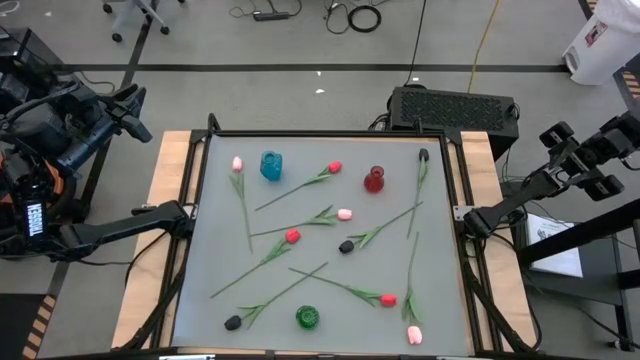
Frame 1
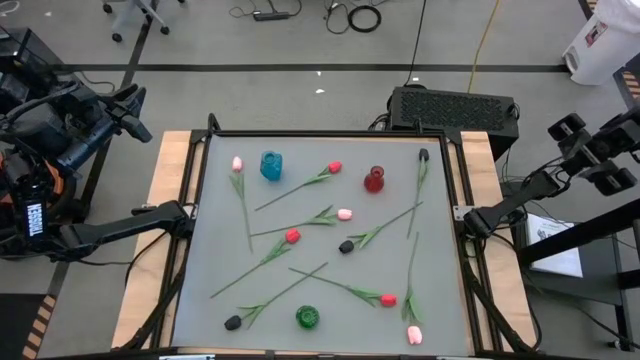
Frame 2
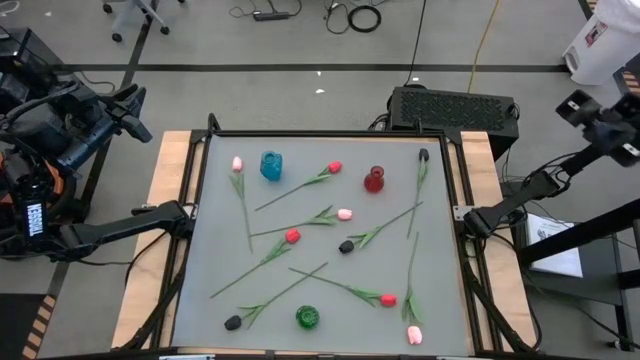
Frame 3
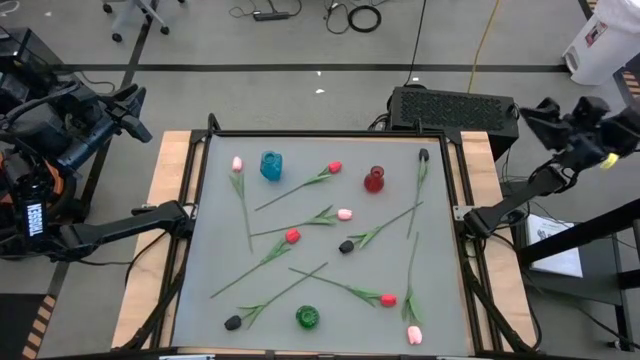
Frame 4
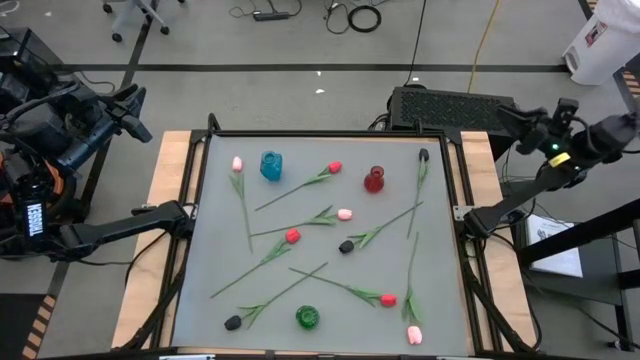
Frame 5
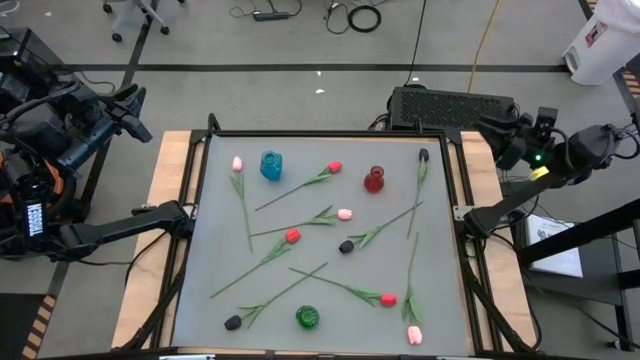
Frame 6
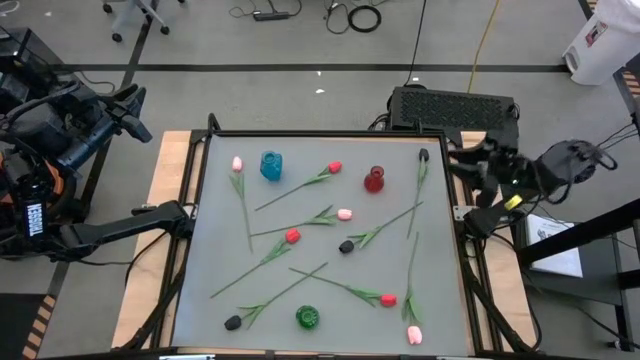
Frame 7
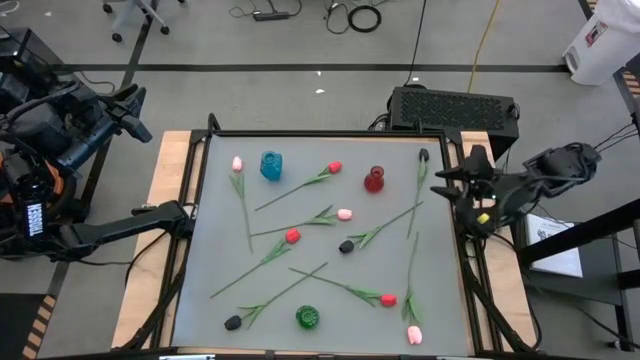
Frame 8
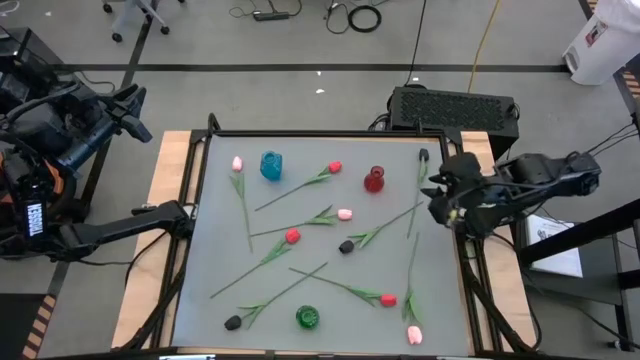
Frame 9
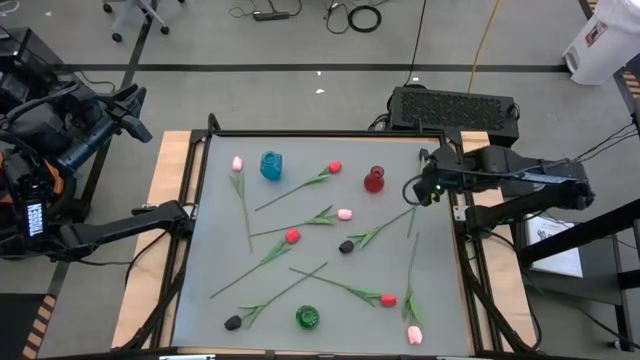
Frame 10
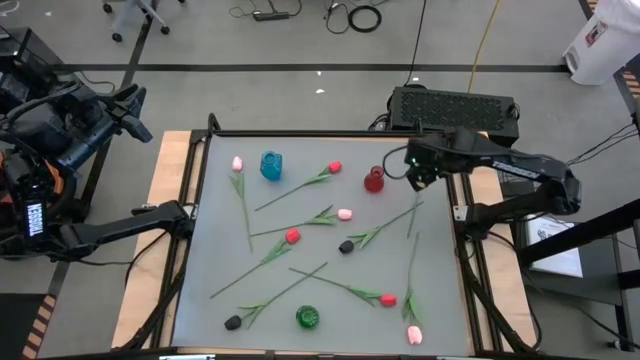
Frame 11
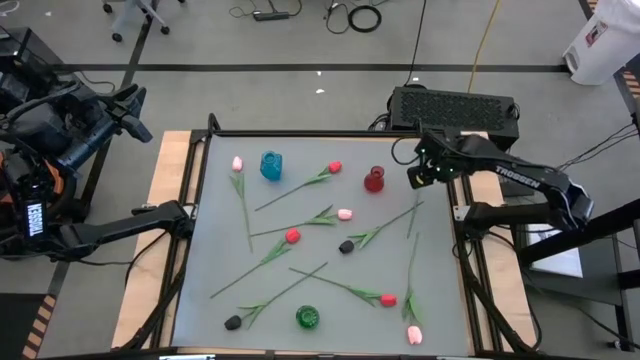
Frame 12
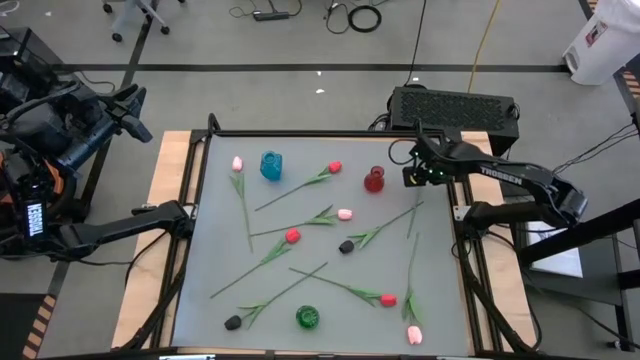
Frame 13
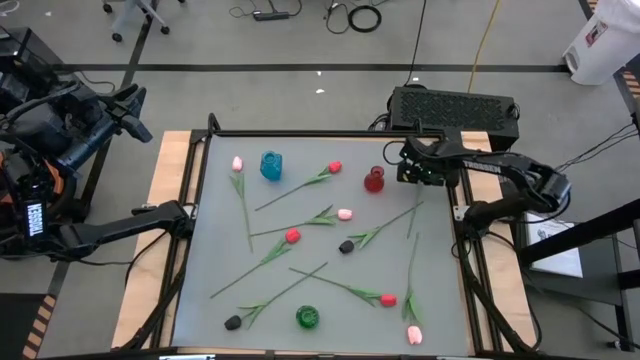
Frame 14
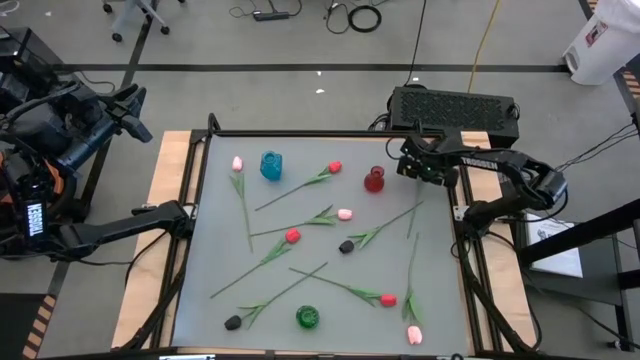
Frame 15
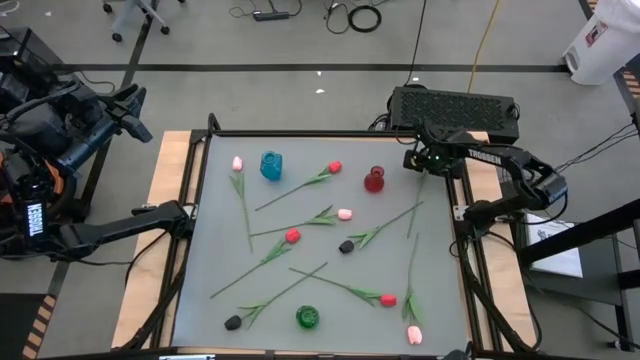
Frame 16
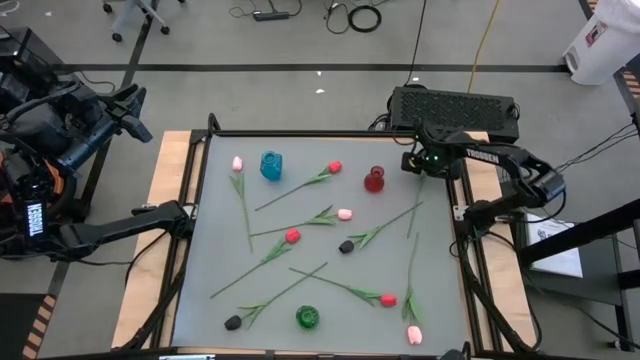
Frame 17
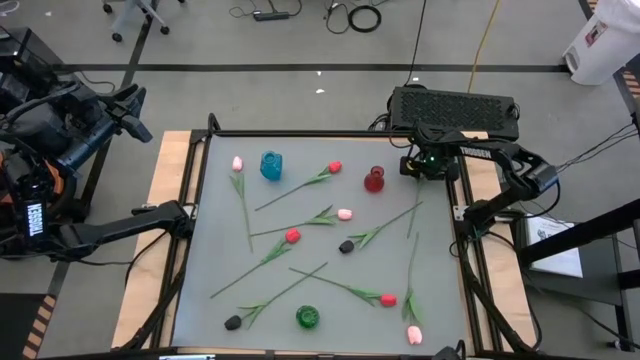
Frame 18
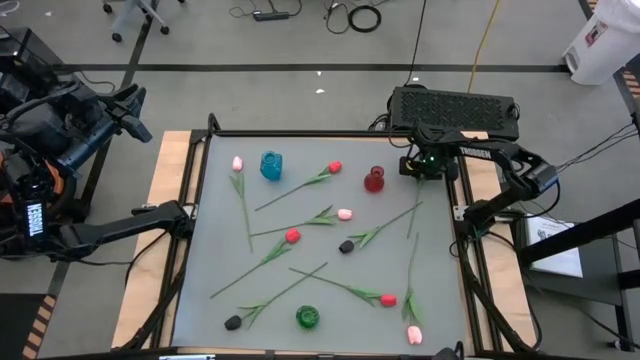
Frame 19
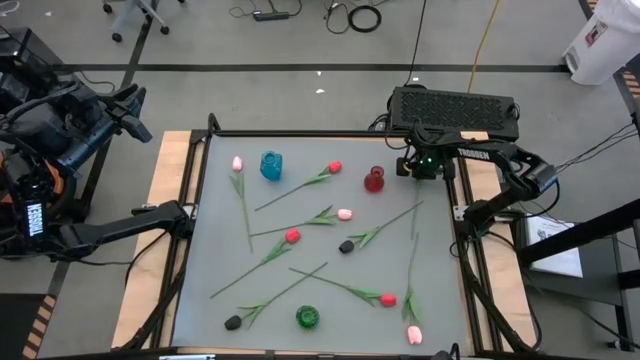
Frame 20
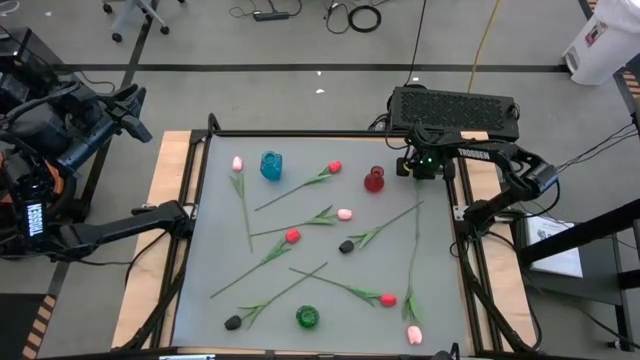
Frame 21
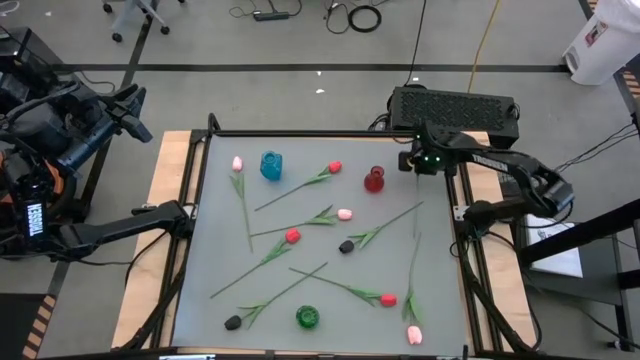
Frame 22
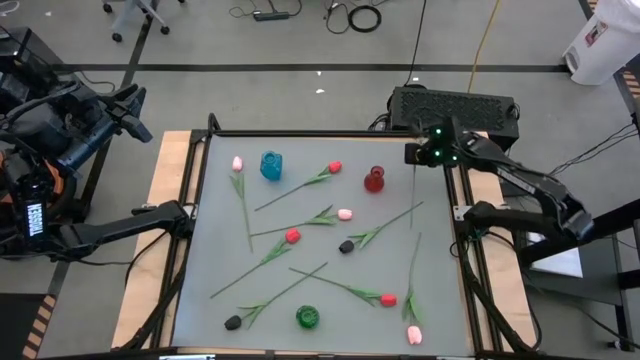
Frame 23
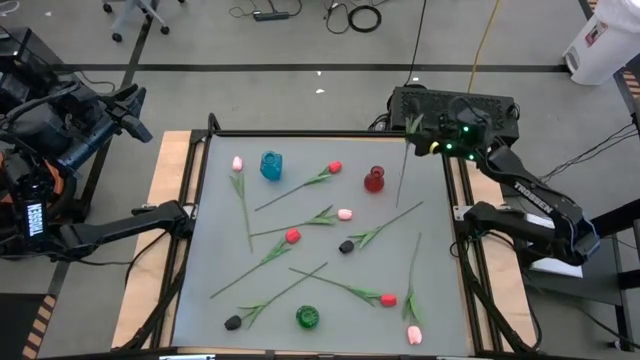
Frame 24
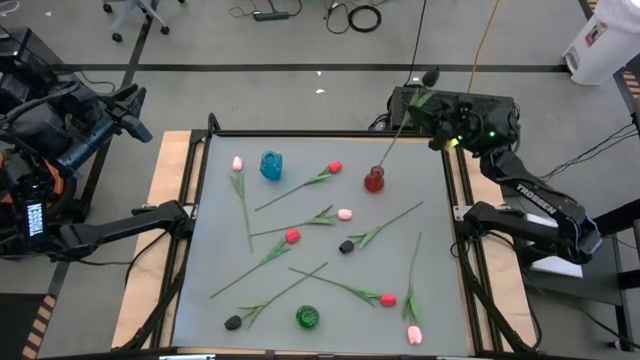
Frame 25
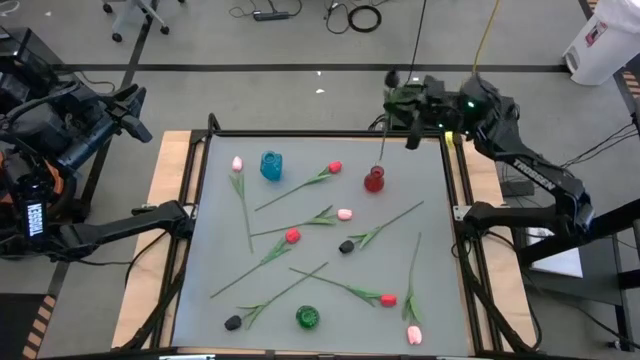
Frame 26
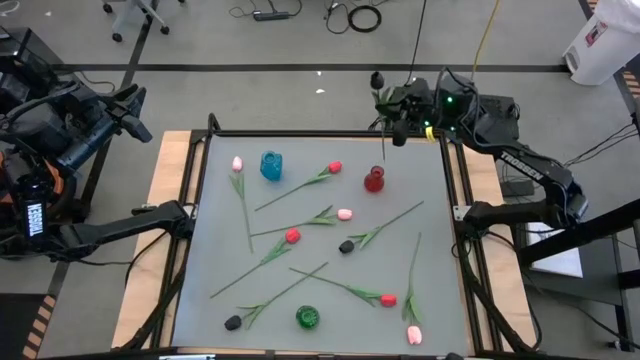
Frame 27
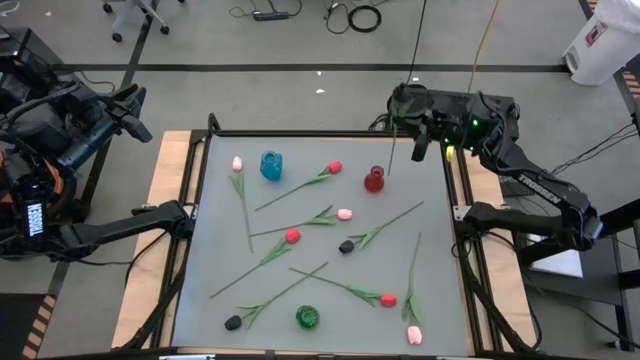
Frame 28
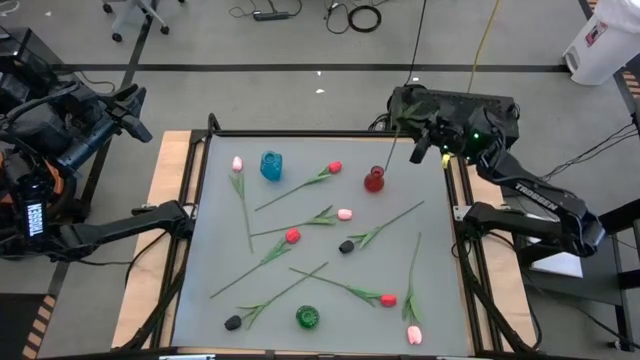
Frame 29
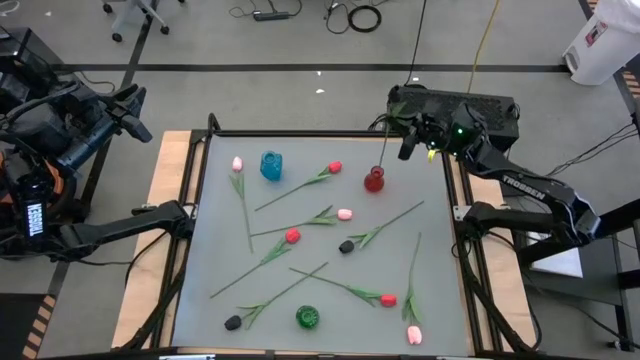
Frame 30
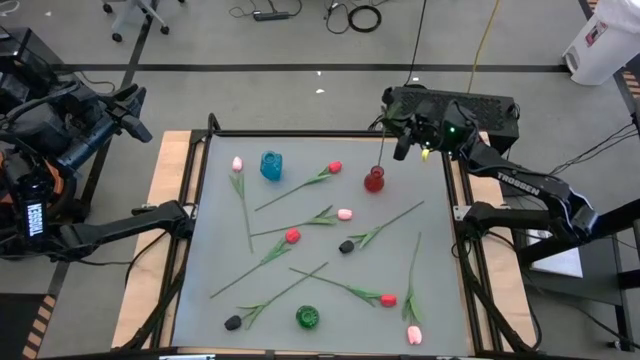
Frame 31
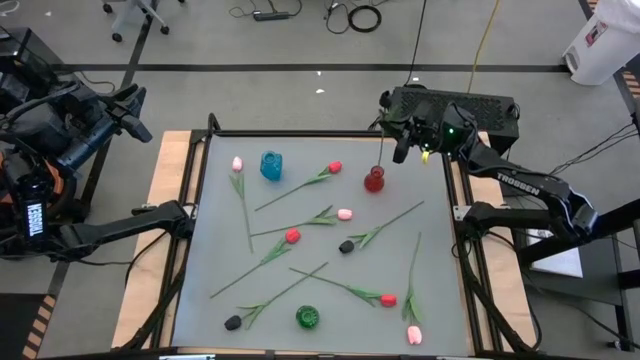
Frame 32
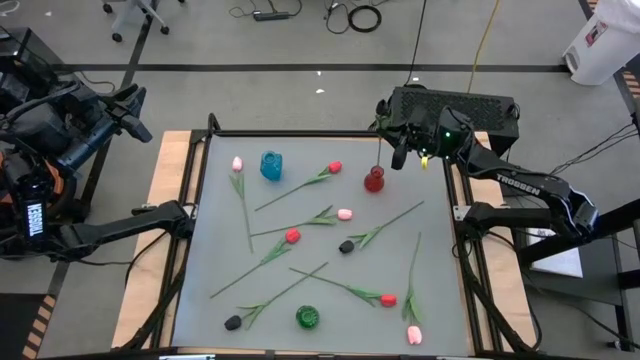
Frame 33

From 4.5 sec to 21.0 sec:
Task: Sort flowers into vase by color
Put the top black tulip into the red vase
